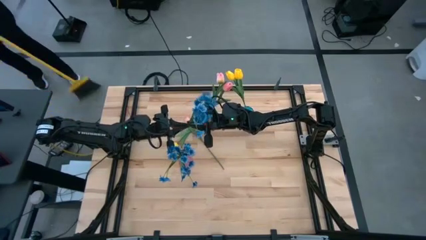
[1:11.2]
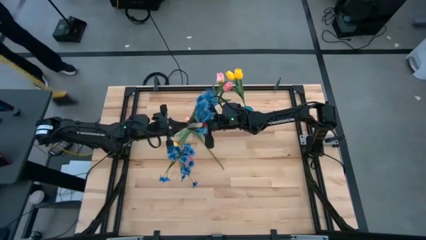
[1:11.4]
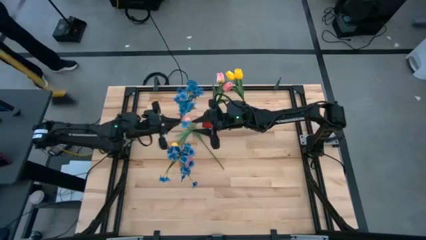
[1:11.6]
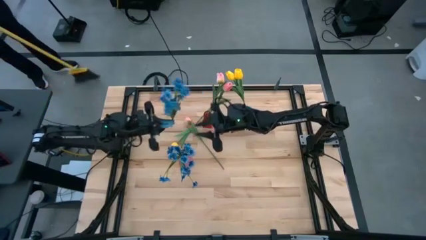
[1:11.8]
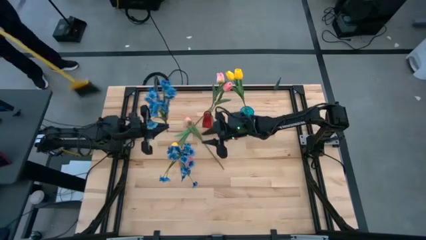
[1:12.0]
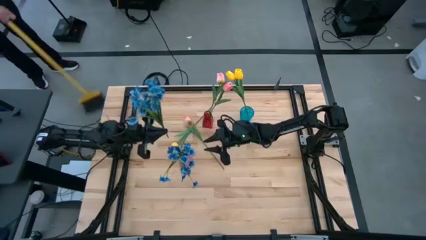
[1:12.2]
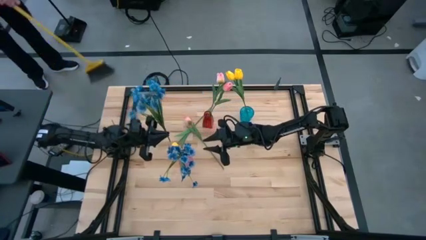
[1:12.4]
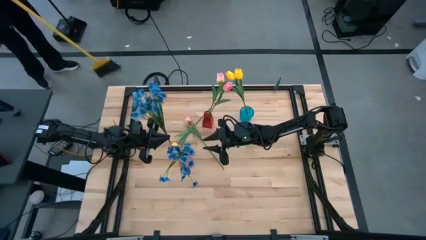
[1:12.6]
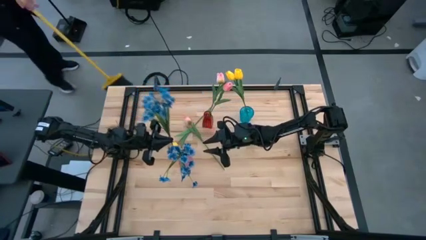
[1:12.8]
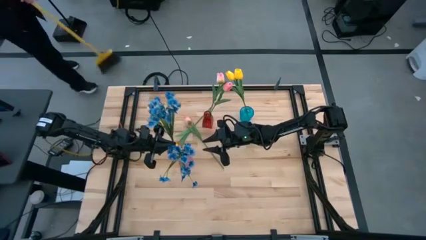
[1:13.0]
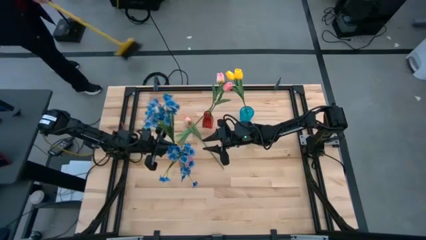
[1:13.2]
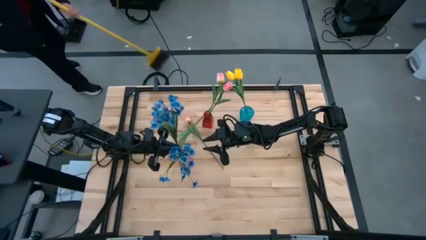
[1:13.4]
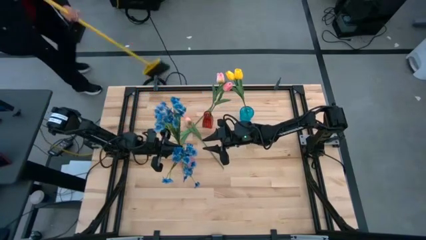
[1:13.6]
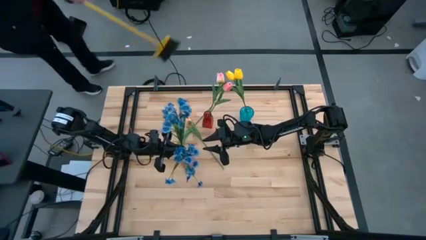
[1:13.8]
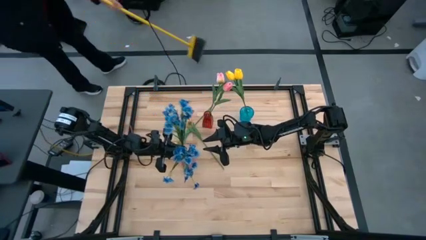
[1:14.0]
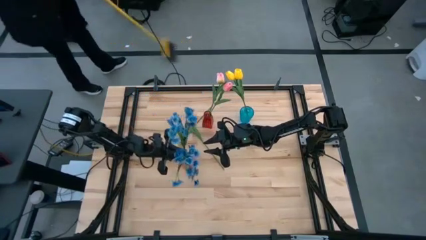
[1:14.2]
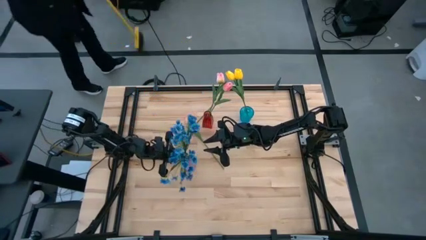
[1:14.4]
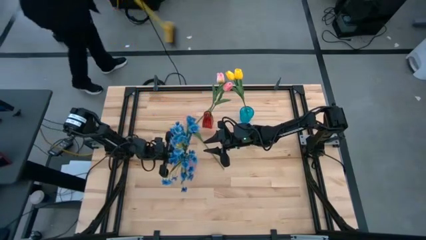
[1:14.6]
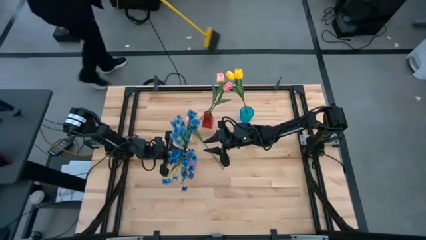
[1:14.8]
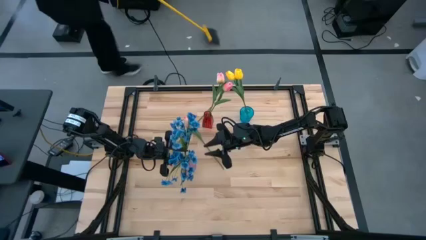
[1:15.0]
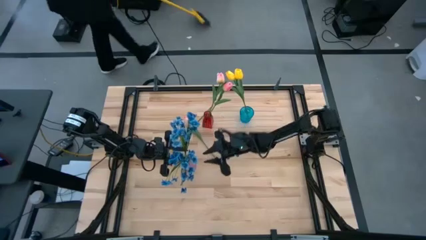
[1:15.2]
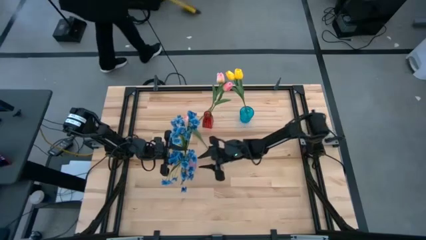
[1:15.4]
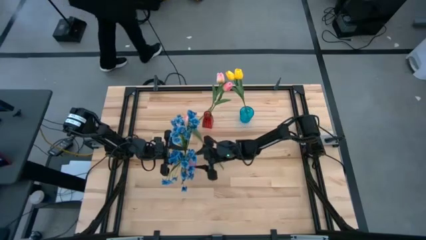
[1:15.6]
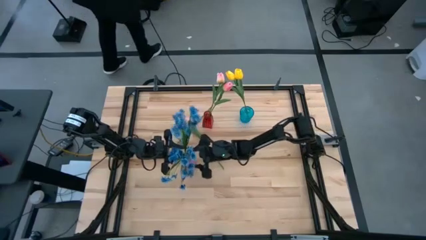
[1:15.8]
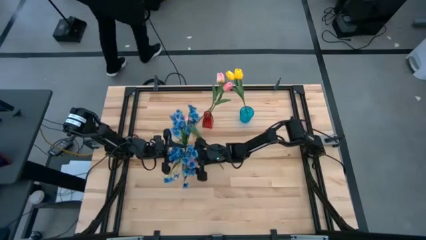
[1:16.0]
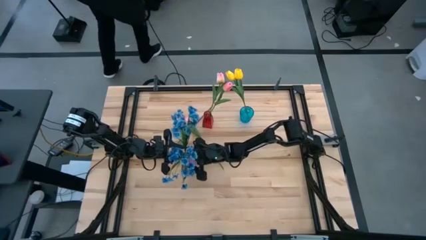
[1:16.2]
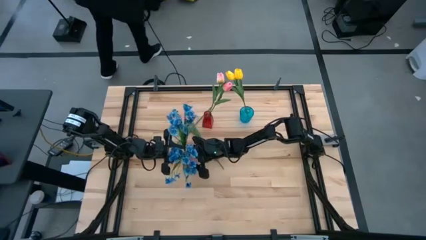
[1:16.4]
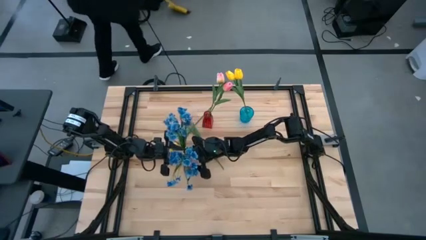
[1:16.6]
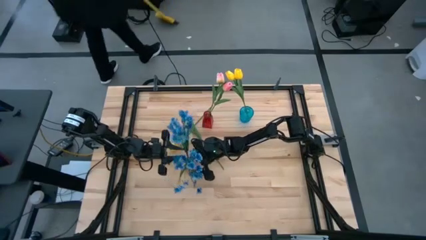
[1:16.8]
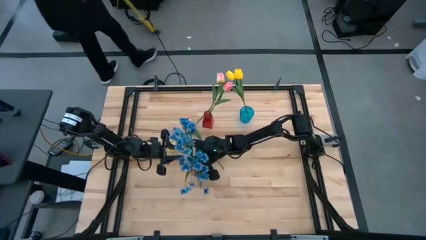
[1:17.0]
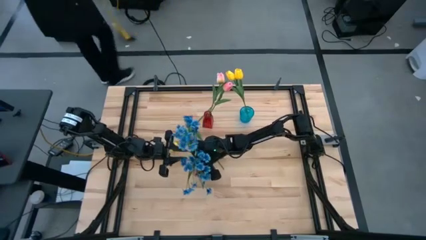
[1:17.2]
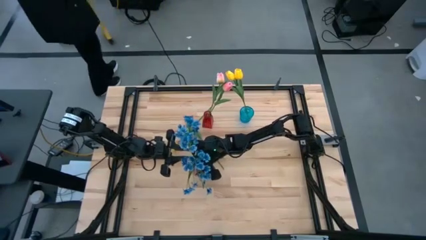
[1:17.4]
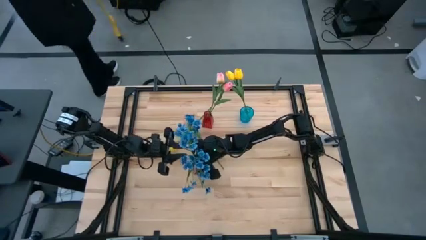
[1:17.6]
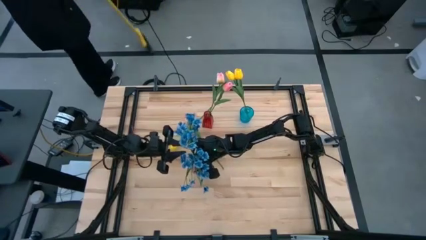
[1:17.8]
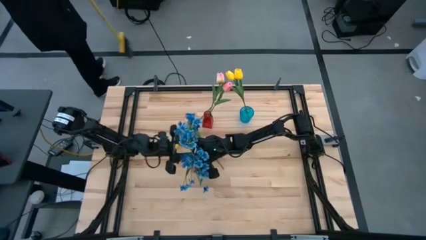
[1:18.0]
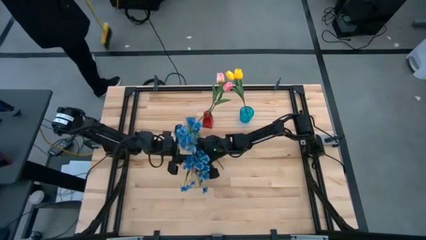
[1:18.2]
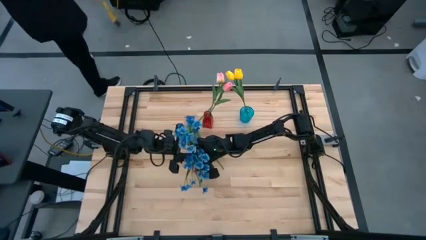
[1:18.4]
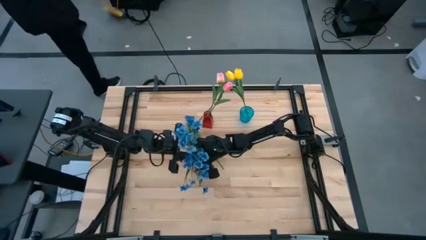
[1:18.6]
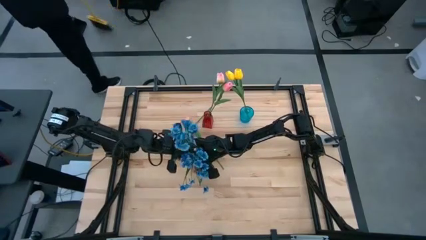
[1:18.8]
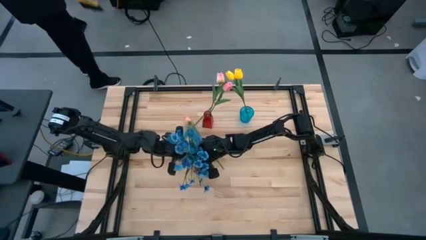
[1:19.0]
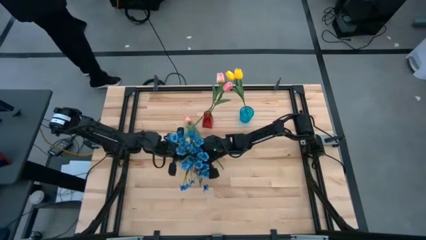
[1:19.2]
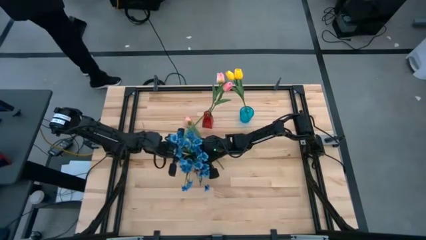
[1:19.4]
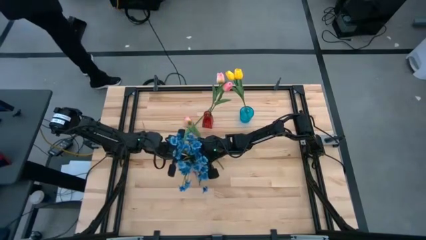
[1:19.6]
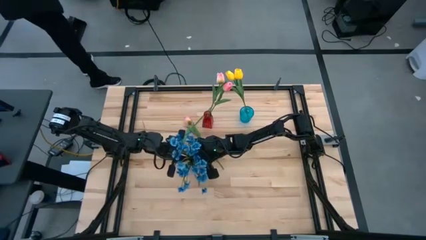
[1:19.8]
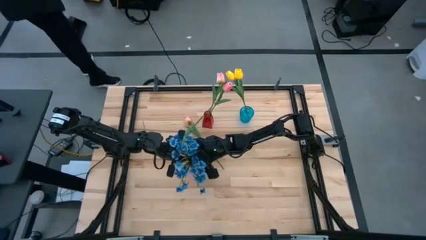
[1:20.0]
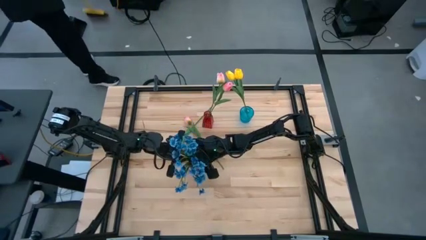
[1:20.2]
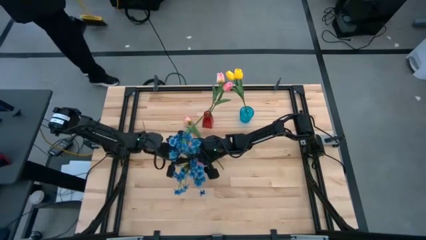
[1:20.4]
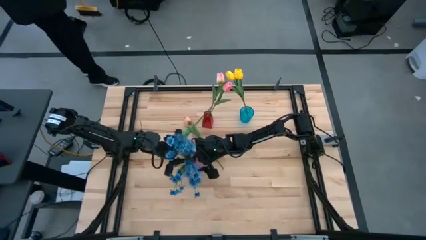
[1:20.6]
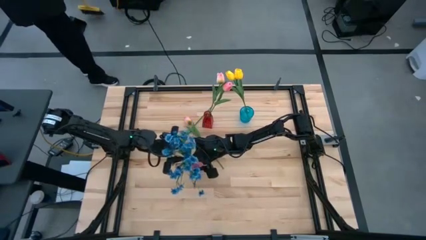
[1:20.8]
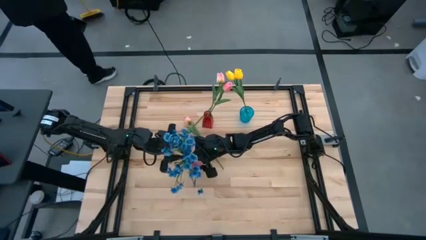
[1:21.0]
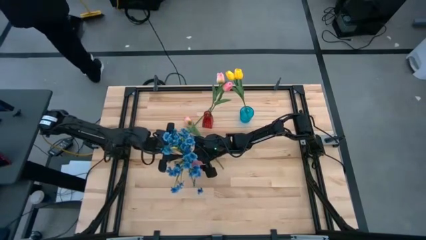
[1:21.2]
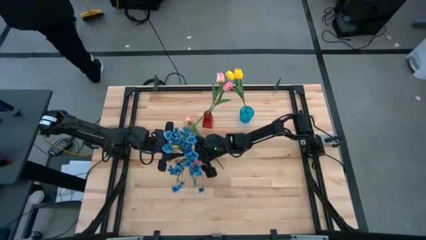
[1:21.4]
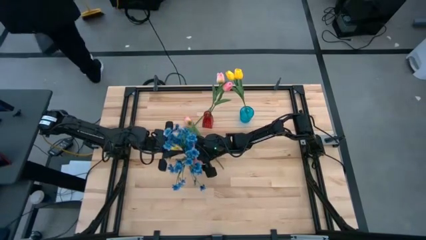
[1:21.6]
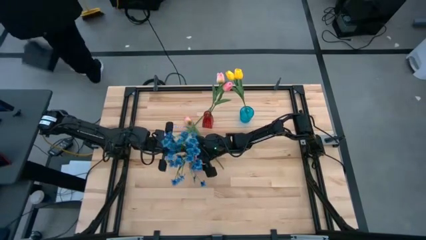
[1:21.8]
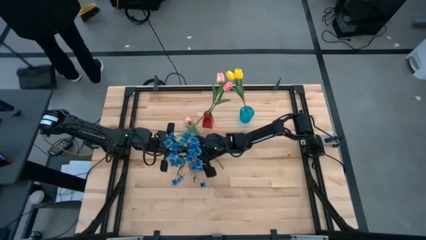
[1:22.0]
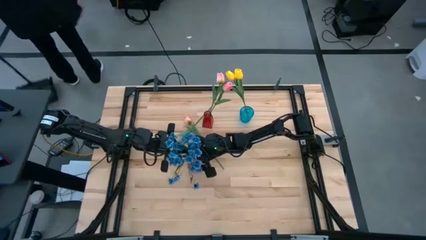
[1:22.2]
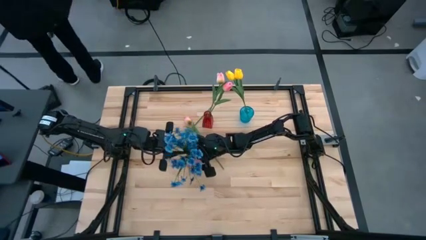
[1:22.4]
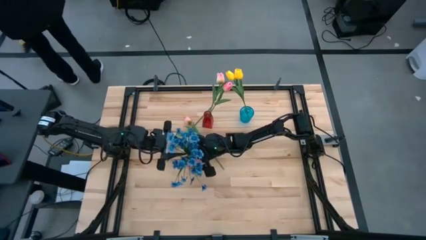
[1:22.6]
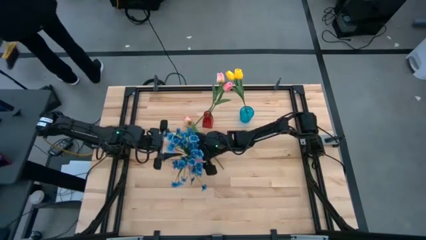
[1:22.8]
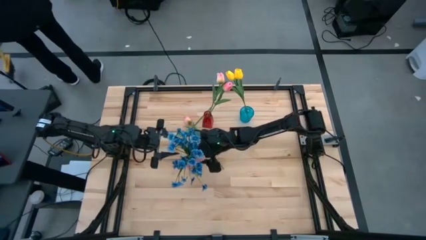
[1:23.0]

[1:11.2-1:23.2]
Task: Sort flowers into vase by color
Put the blue flowers into the pink vase

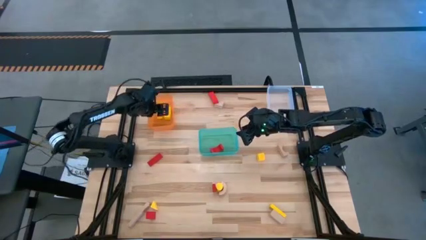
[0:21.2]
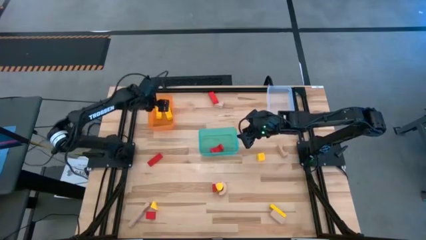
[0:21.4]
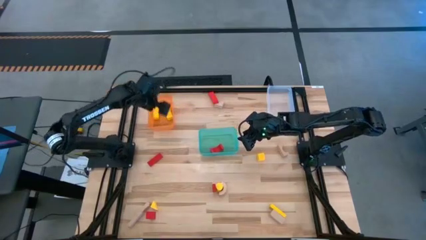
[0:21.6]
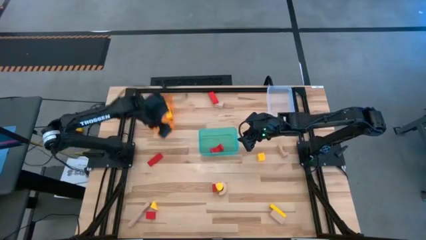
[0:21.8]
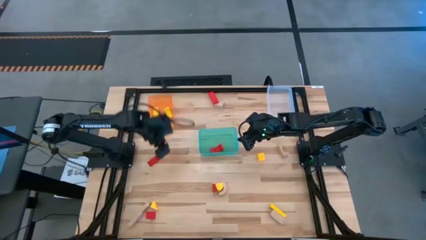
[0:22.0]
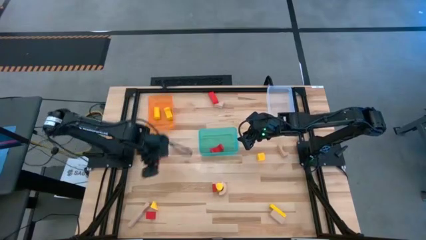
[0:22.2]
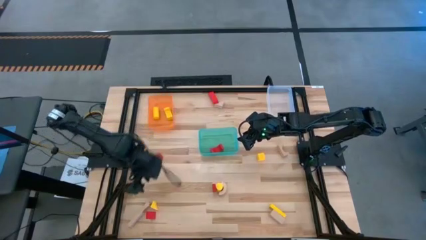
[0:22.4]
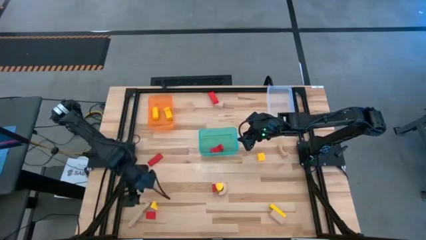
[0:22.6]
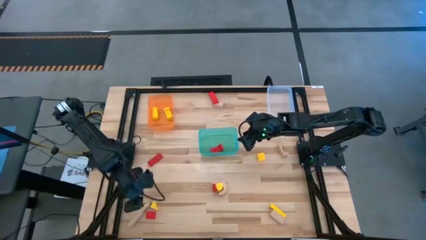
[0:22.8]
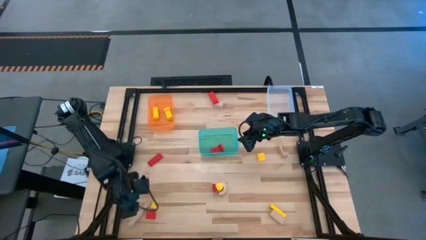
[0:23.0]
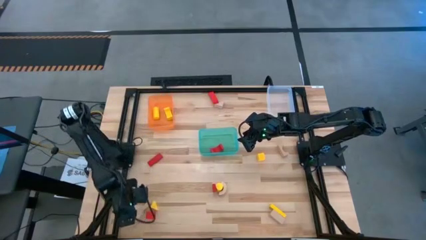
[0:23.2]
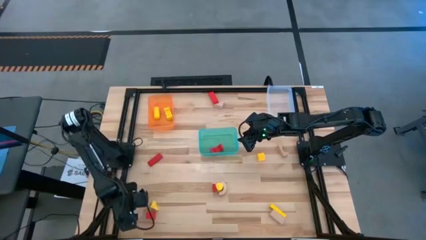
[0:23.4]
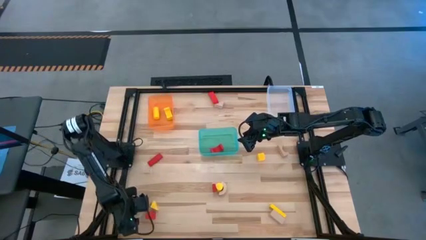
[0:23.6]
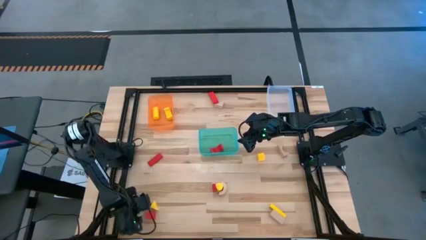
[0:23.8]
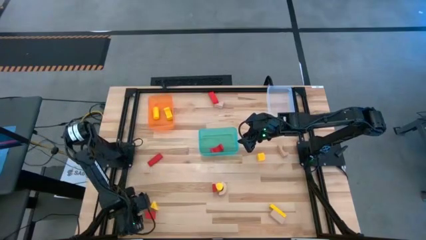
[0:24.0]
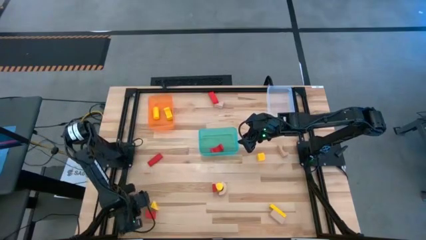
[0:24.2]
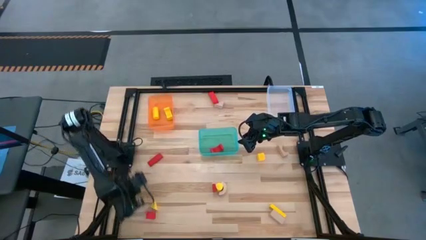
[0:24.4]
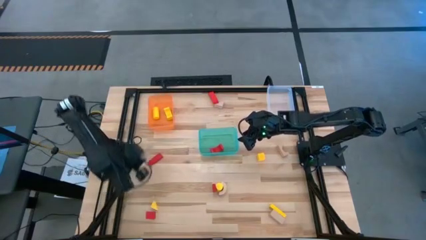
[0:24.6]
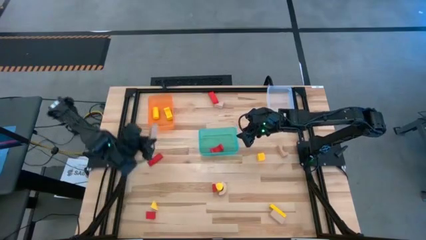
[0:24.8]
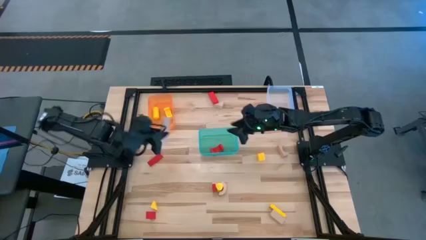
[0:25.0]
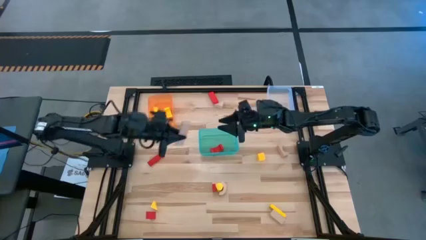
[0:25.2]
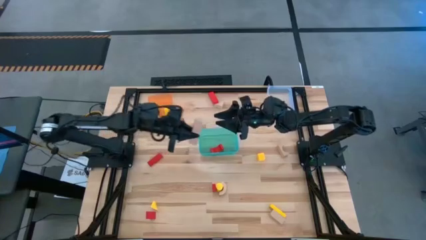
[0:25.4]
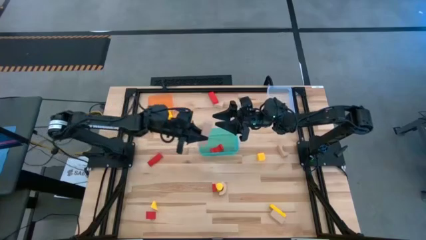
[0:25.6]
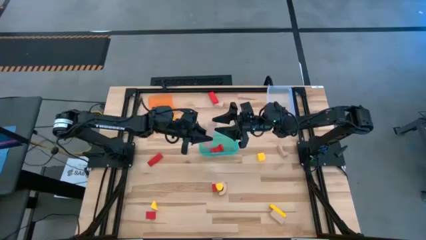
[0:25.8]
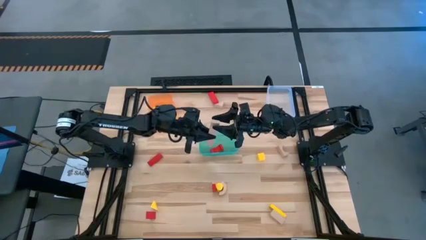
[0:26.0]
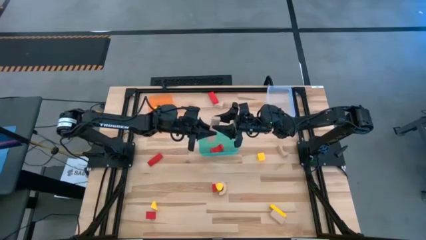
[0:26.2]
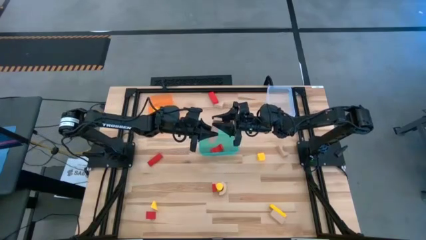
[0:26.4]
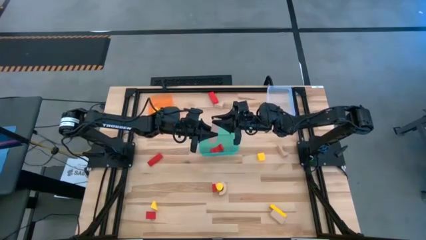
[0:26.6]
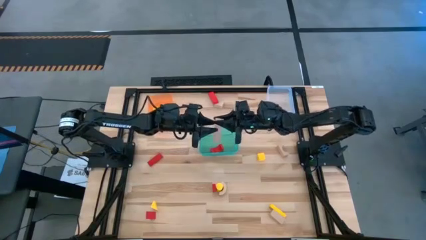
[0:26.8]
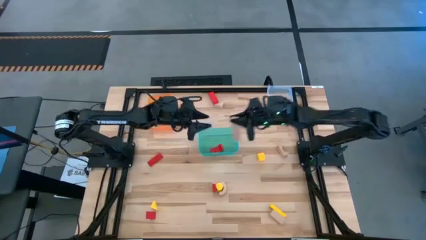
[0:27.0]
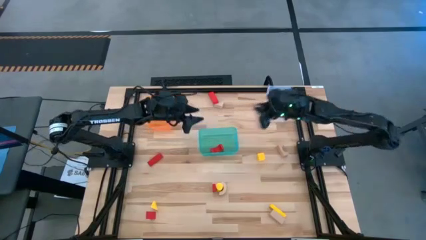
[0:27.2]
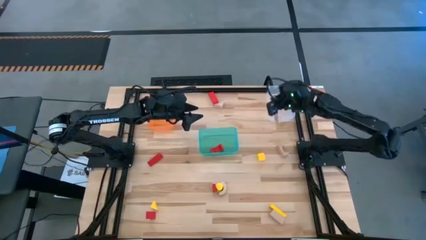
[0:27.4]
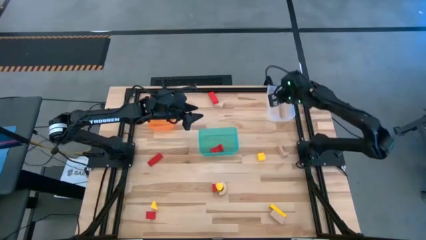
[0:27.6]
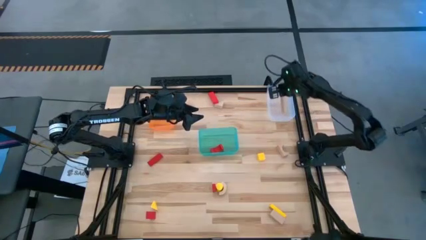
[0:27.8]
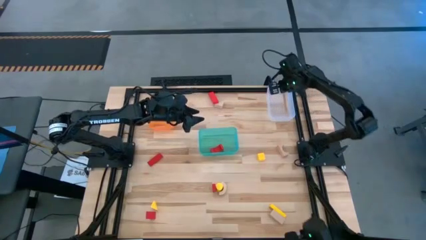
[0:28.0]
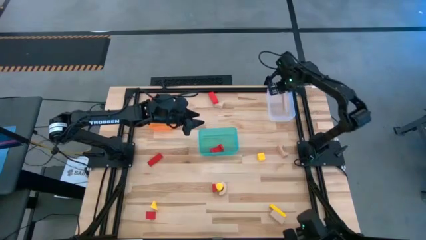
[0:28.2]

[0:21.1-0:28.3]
Task: Sort & place blocks by color
Put the brown block into the transparent bin
